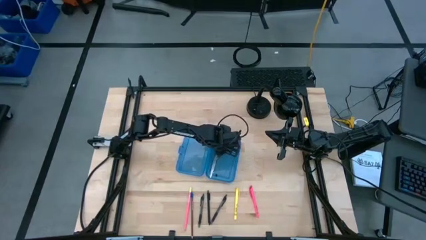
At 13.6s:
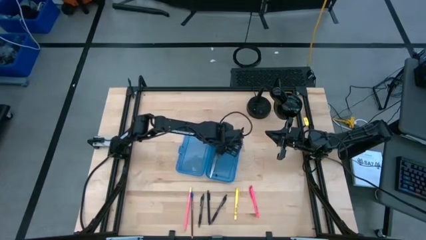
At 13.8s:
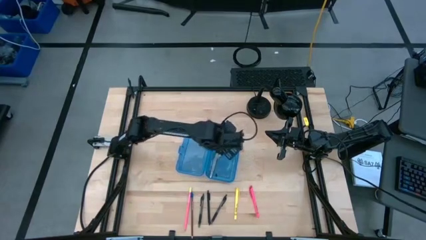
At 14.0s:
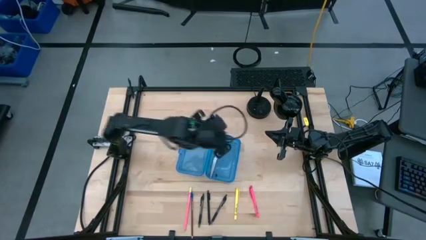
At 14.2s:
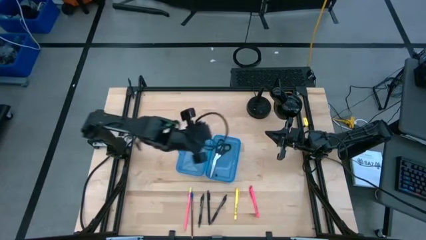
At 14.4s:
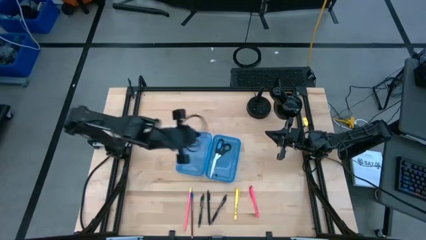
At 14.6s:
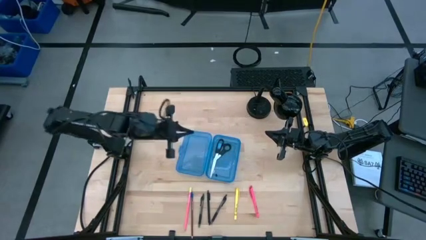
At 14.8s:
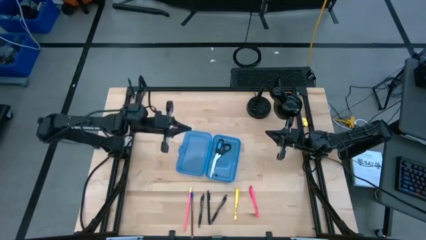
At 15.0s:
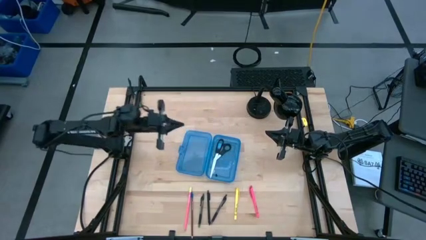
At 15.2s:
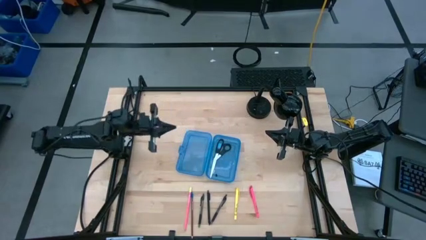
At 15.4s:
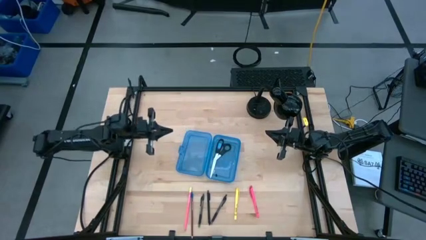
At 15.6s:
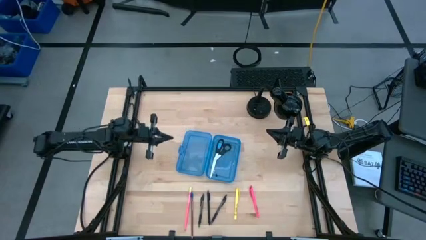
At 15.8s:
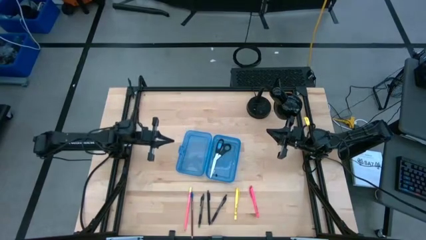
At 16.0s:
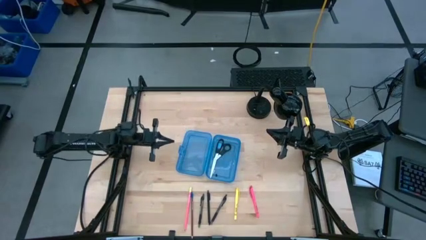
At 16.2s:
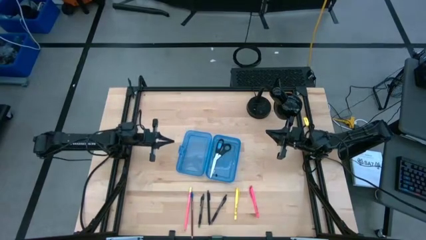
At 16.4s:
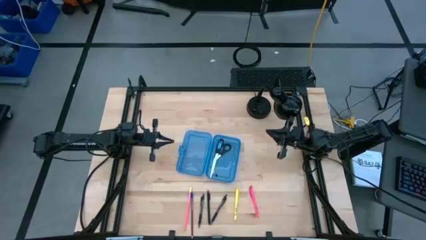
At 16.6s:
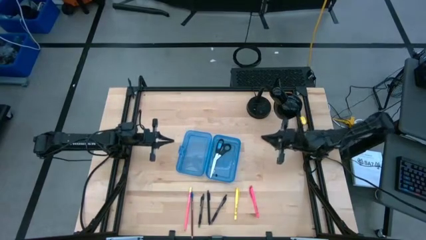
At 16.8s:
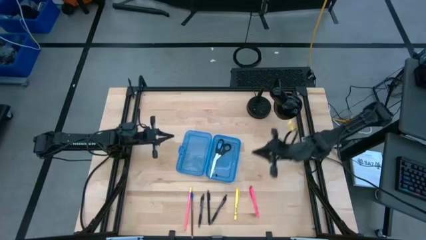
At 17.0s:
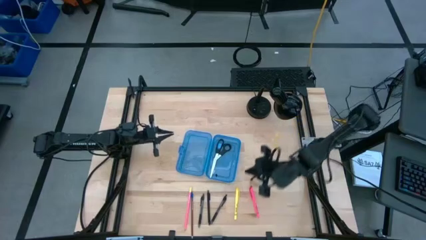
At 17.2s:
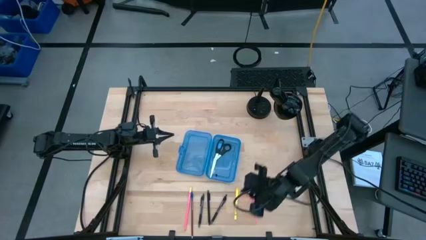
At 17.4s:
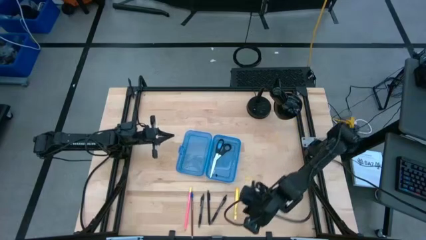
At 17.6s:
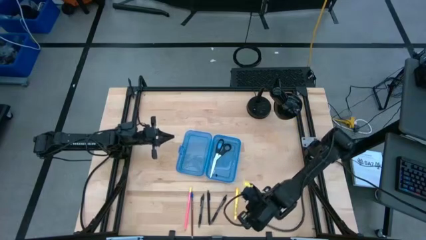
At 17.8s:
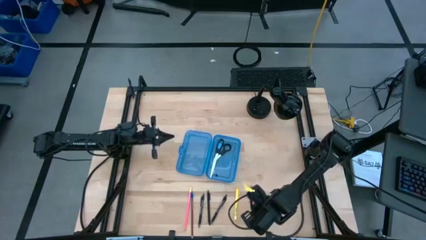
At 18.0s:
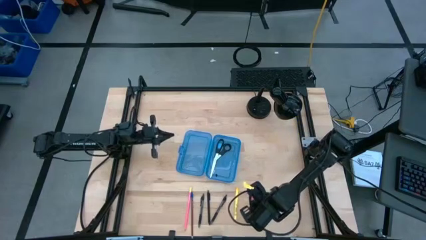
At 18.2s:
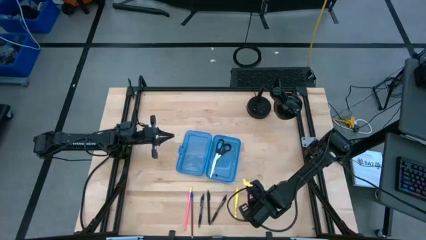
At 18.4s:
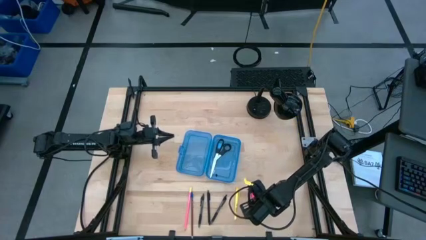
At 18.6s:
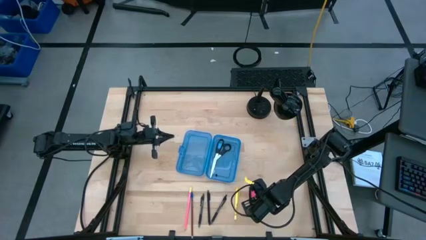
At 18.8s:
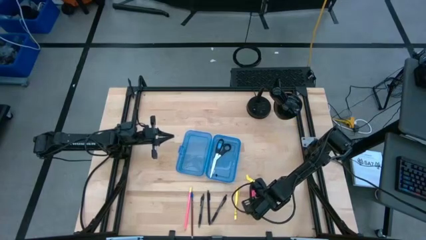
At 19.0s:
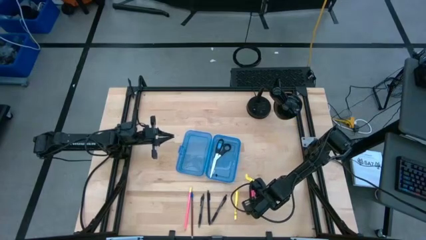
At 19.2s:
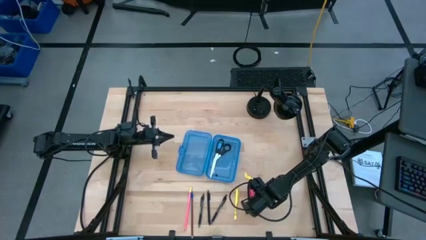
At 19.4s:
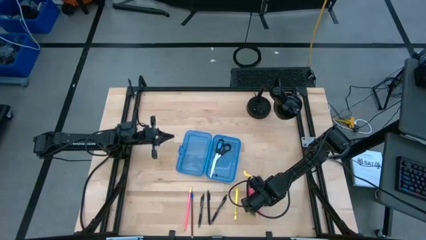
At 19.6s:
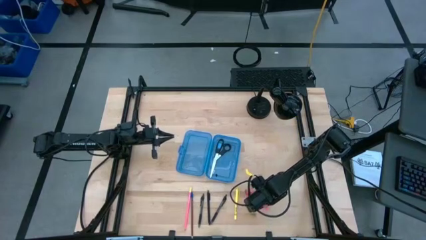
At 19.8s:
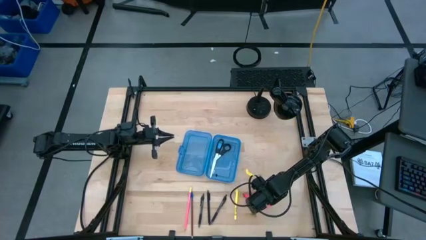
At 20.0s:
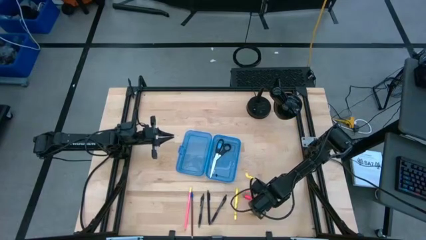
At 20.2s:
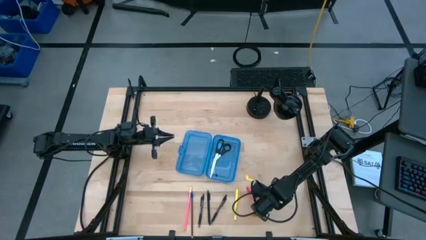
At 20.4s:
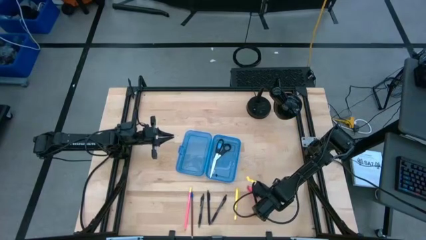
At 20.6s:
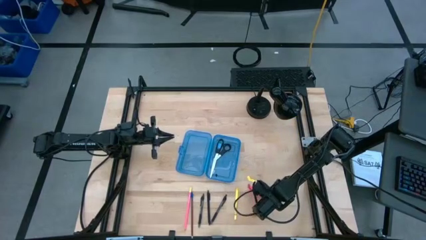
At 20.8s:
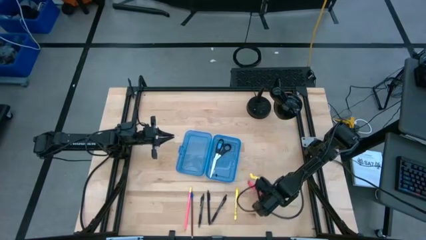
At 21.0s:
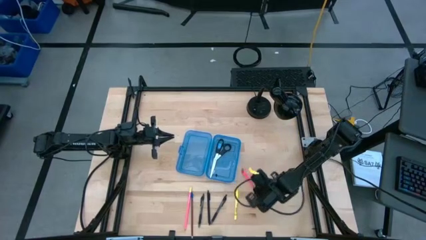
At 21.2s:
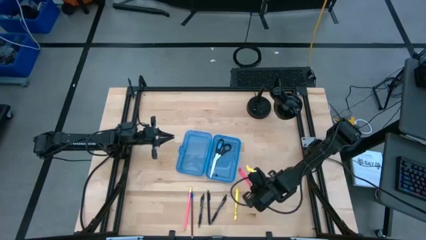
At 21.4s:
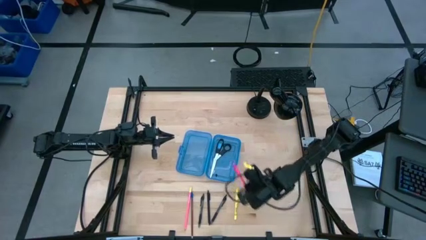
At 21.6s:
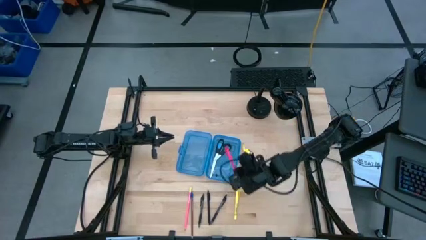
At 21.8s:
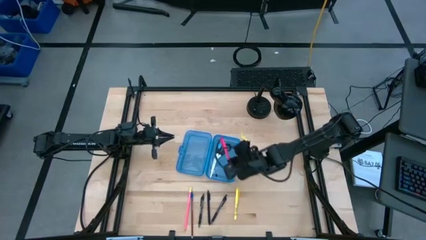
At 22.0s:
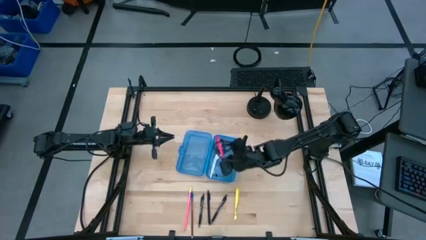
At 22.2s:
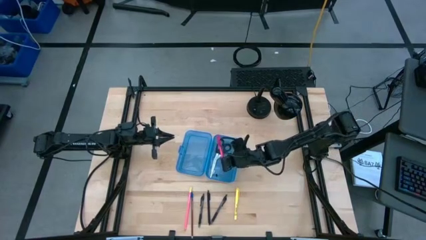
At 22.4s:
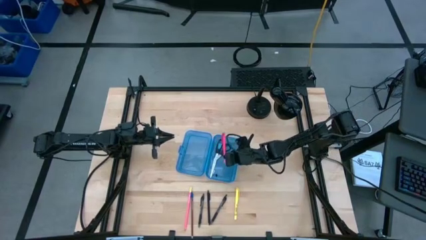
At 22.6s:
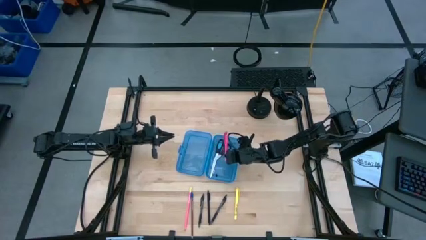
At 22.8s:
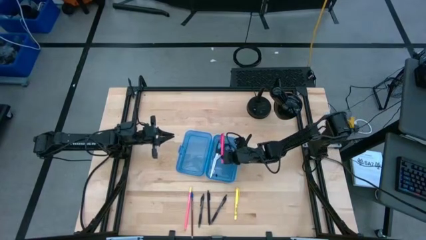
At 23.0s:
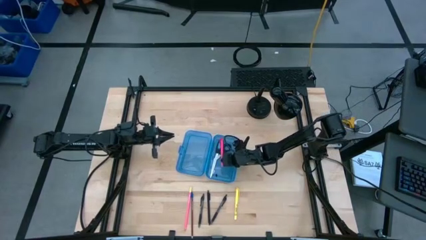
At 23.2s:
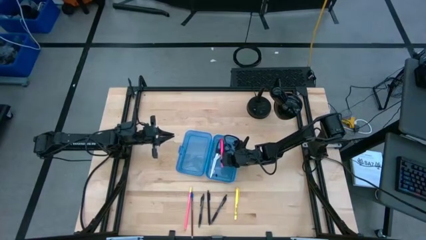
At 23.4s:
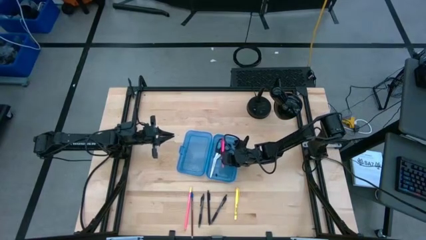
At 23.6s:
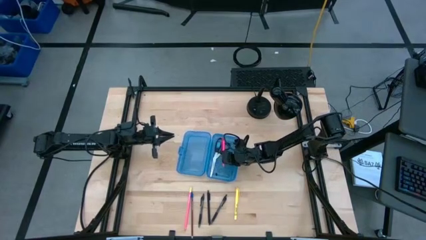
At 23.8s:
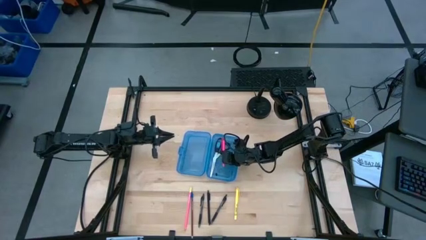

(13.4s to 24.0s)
Task: Pick & place school supplies into a supply box
Put the pink pen into the blue supply box

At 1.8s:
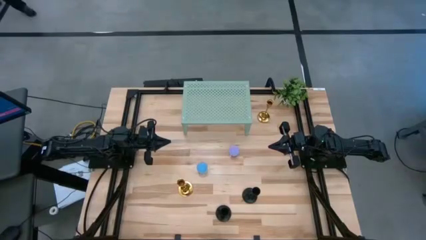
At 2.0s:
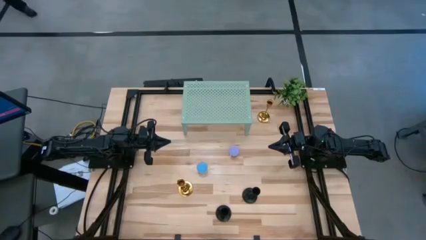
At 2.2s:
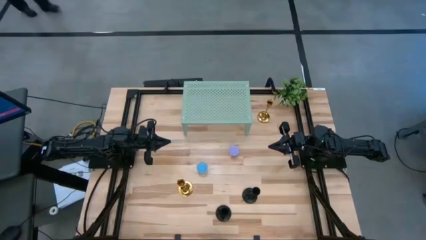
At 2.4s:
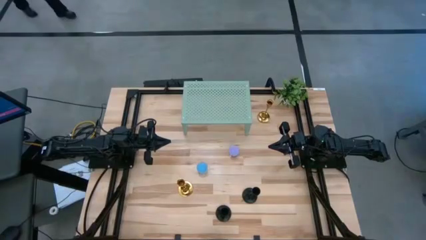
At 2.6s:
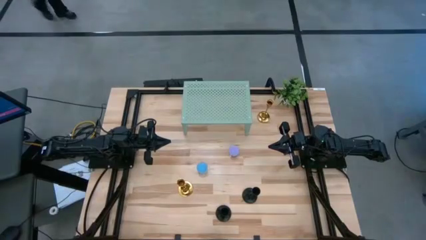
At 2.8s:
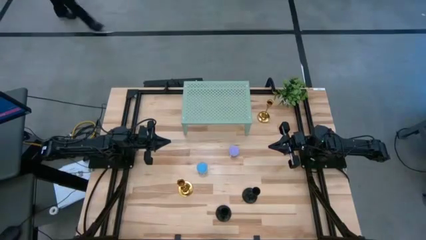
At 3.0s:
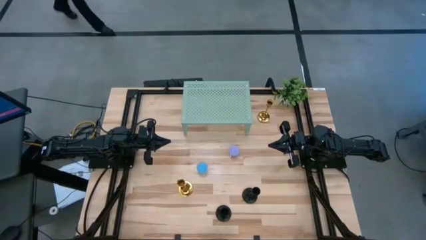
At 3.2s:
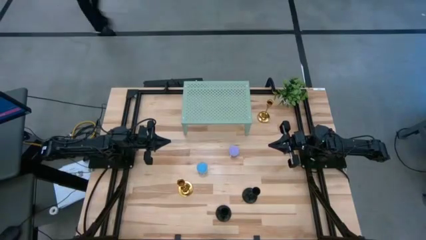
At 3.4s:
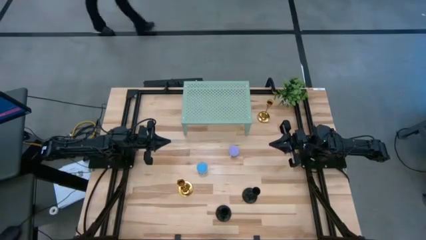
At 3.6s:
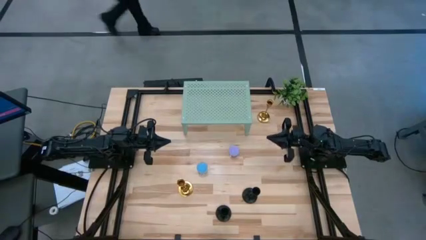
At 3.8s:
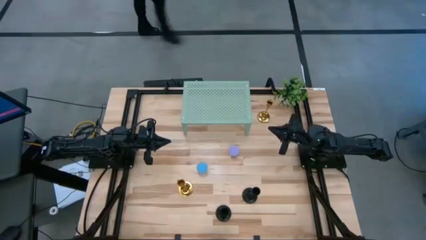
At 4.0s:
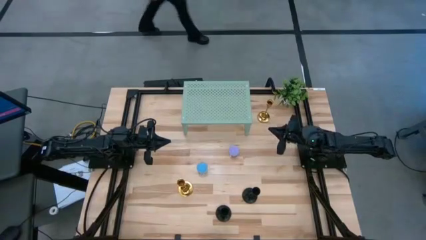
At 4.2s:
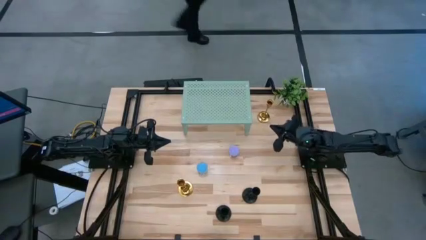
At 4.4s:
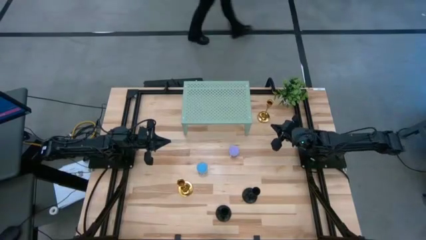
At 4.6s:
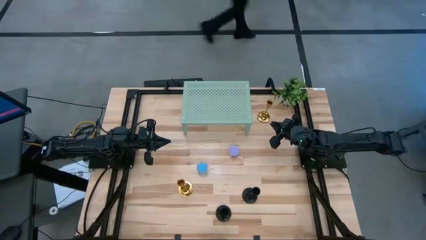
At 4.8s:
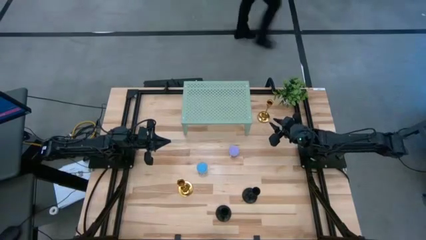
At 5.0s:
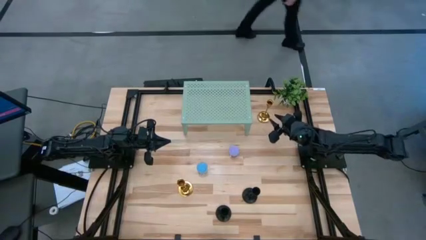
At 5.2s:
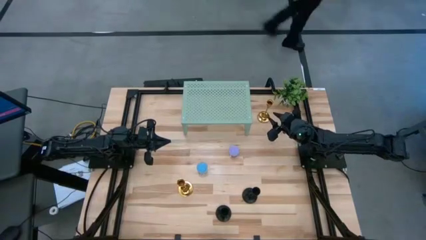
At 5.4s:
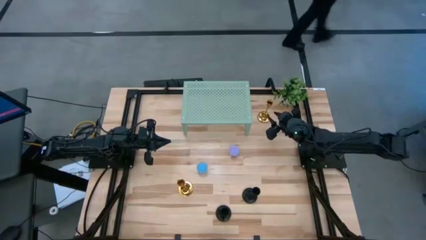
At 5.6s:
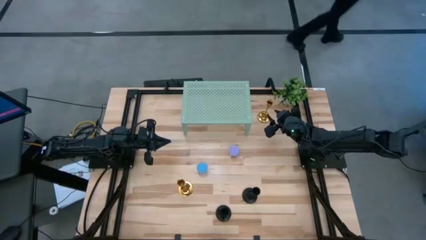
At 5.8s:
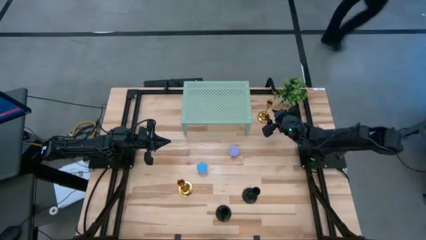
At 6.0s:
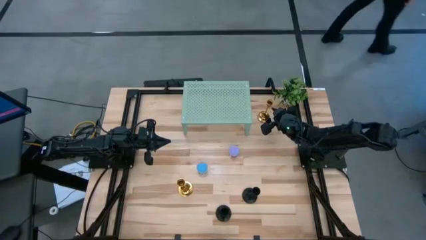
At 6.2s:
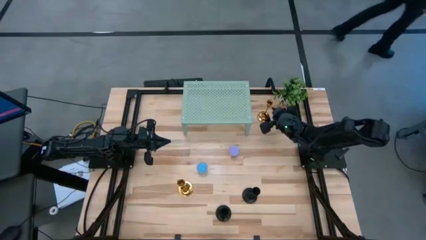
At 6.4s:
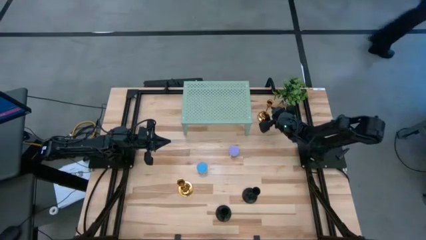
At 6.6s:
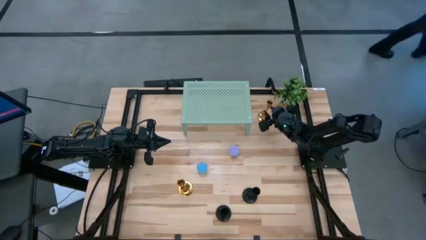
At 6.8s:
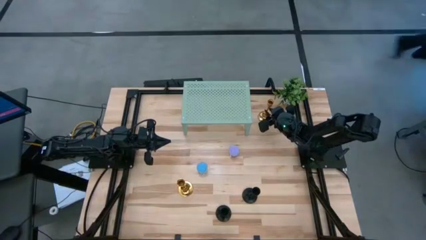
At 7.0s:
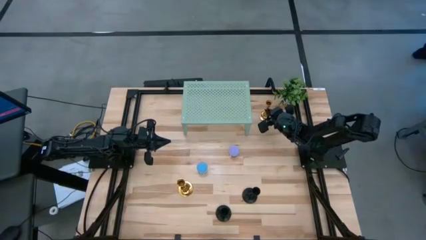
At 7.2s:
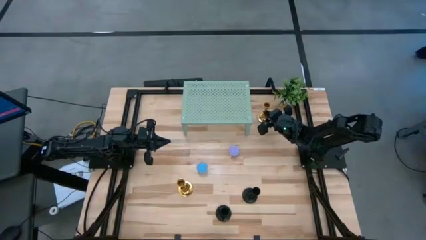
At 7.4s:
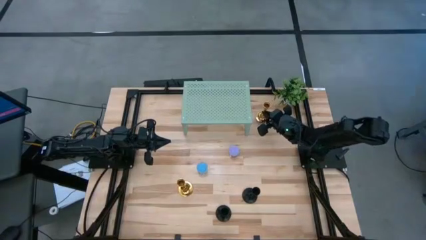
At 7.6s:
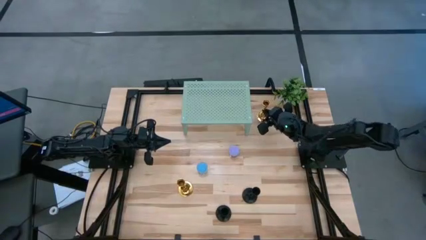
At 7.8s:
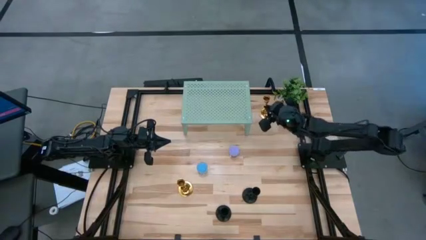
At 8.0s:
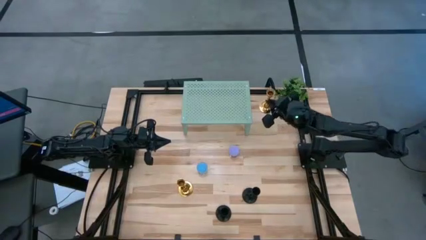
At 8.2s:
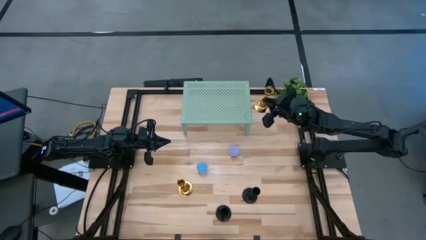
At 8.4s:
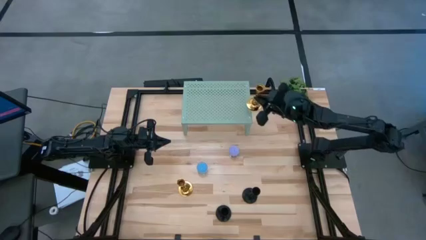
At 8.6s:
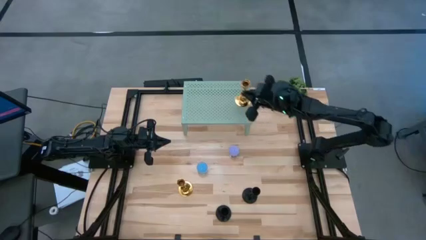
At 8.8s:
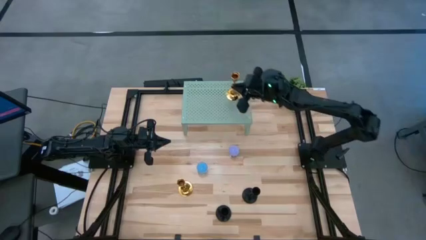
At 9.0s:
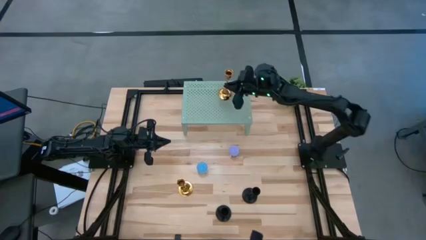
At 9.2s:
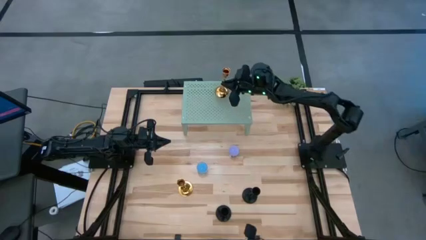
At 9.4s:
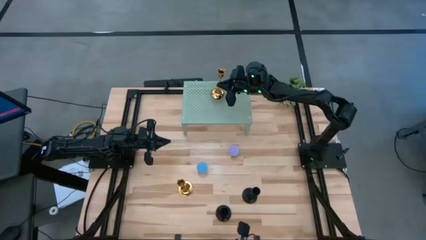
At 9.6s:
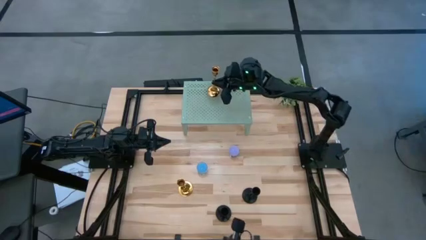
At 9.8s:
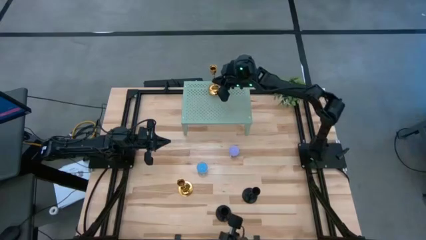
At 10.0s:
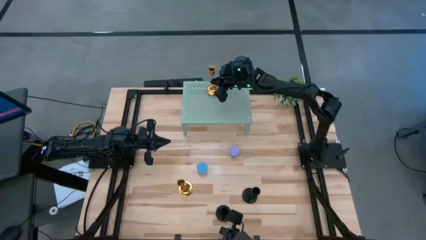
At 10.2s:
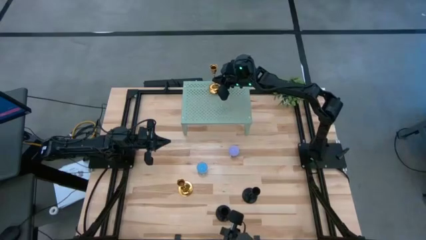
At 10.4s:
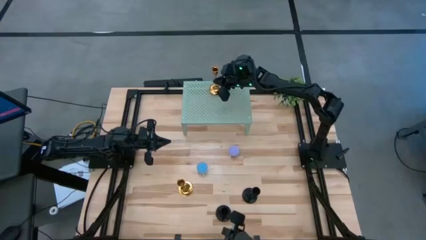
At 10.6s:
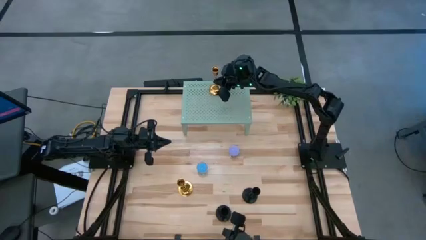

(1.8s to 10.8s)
Task: Pick & Place candle stick holders
Put the top golden candle holder on the shelf
